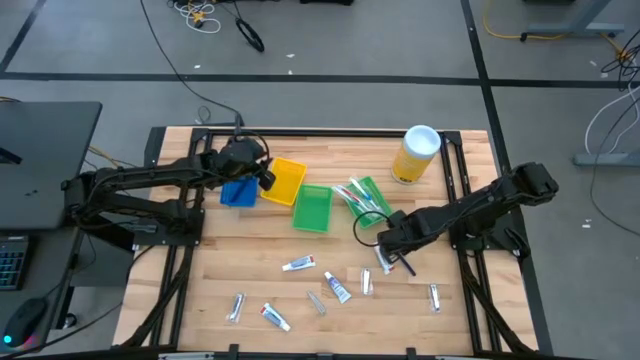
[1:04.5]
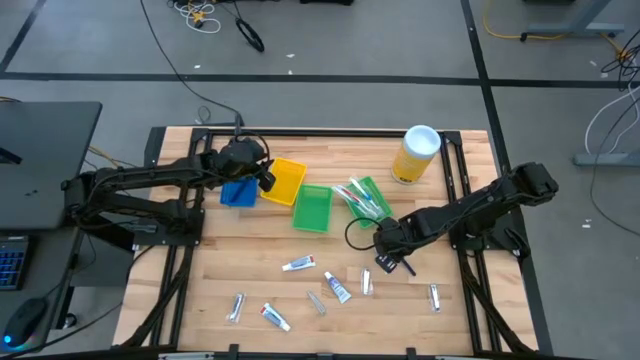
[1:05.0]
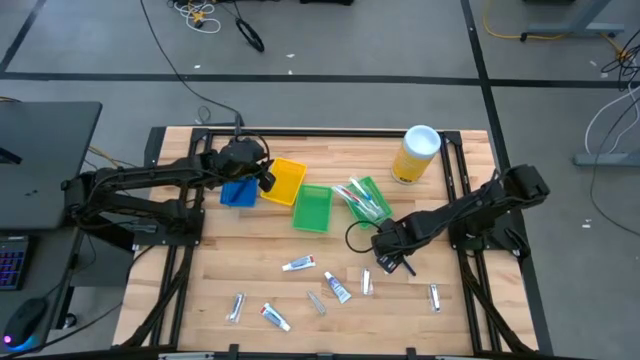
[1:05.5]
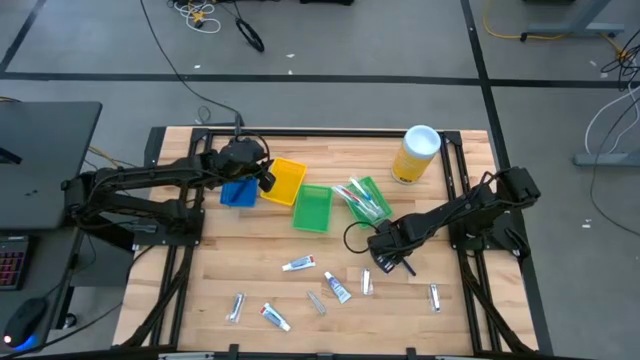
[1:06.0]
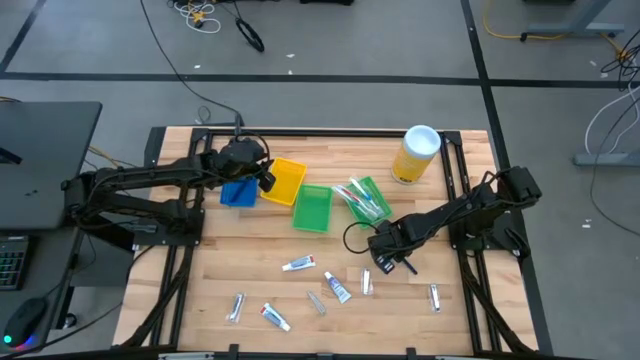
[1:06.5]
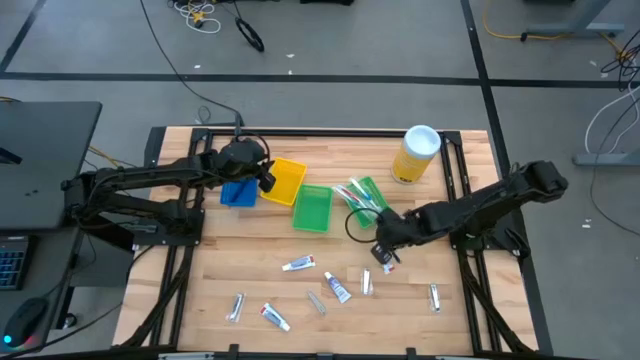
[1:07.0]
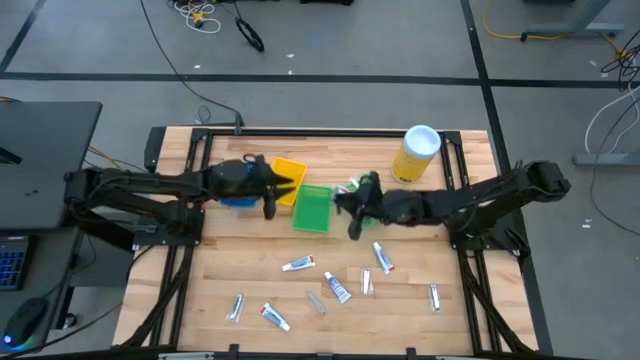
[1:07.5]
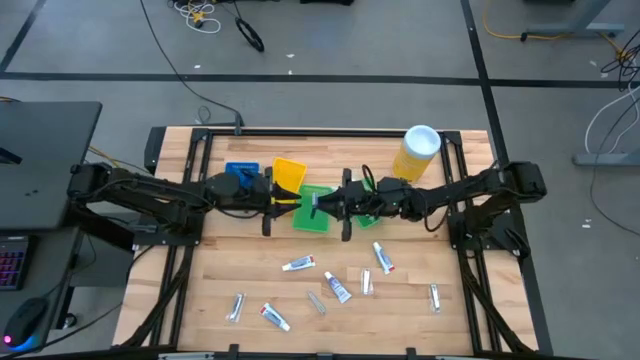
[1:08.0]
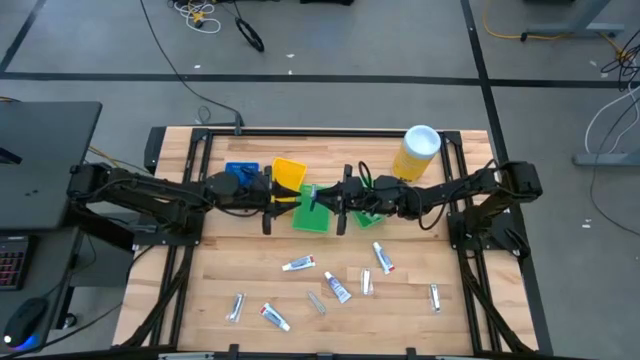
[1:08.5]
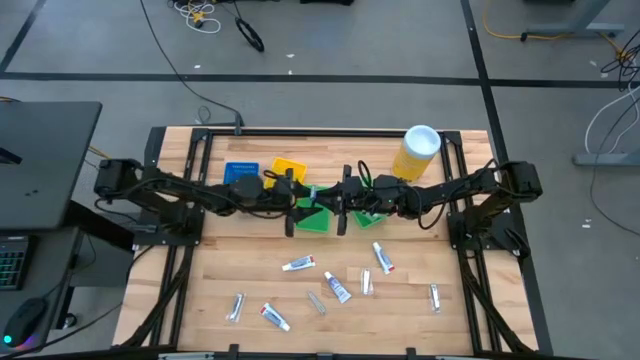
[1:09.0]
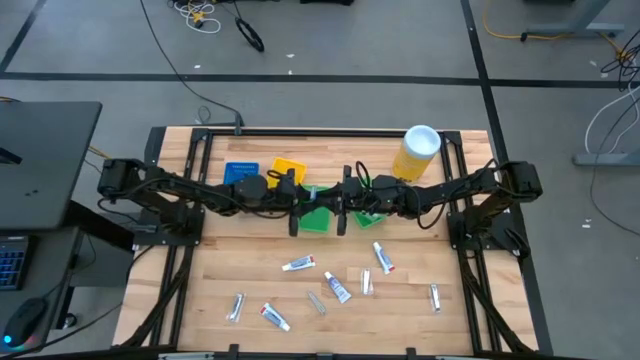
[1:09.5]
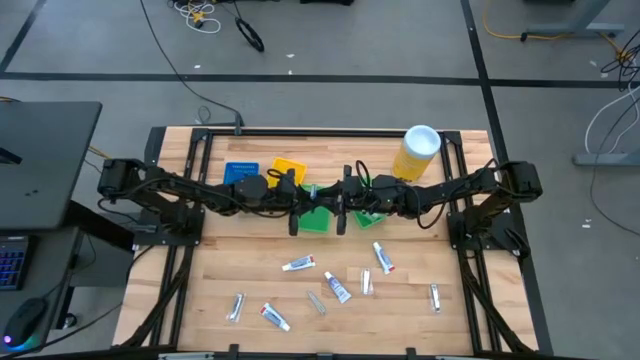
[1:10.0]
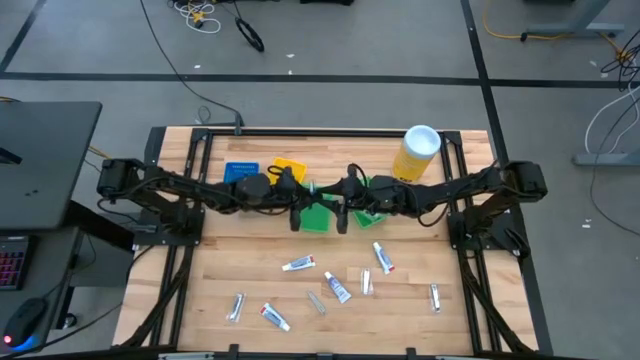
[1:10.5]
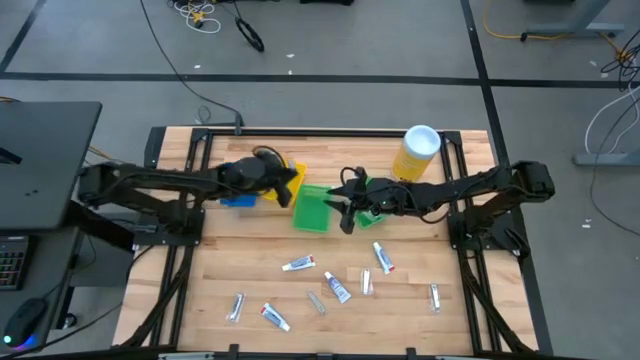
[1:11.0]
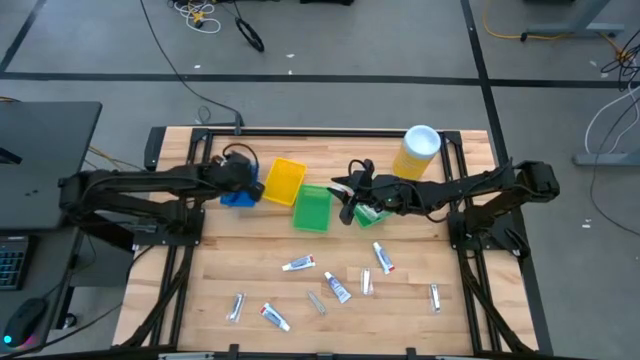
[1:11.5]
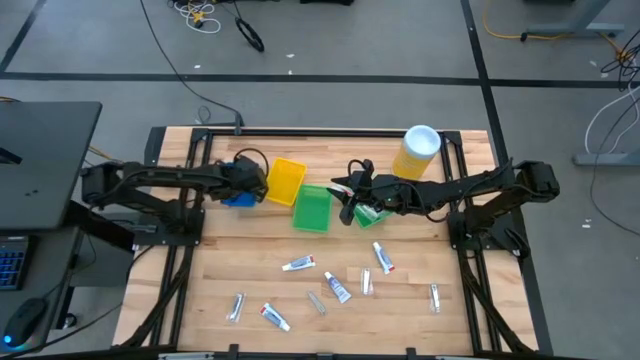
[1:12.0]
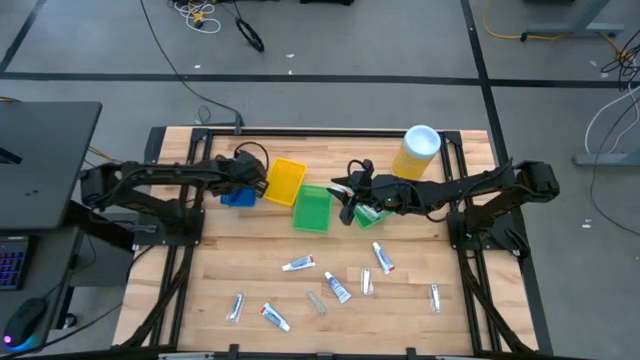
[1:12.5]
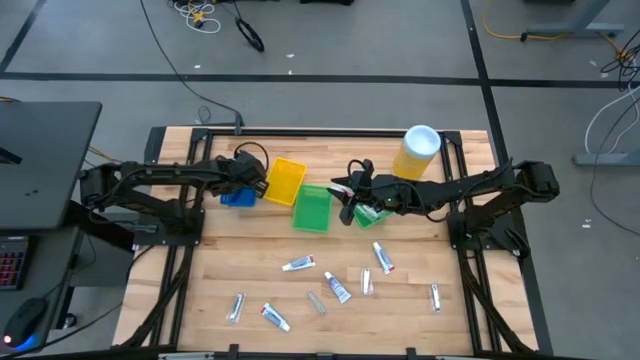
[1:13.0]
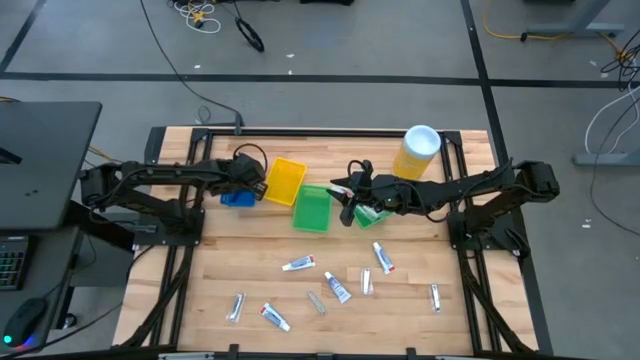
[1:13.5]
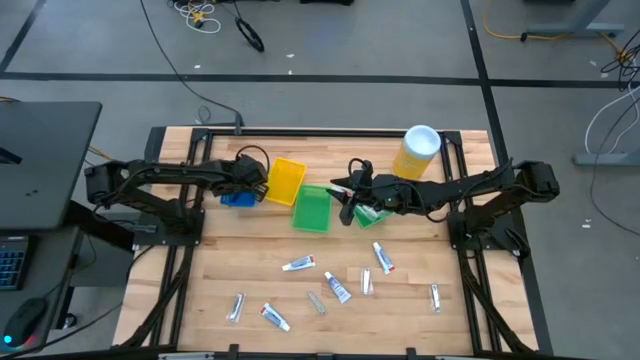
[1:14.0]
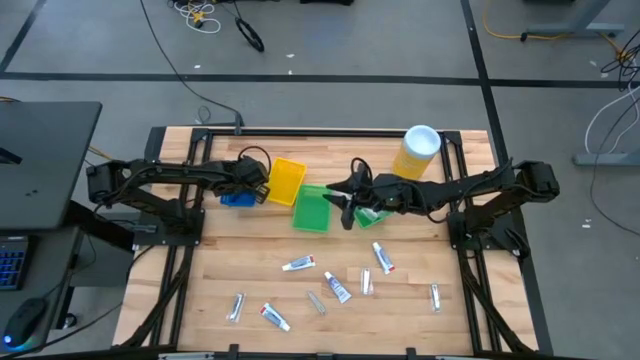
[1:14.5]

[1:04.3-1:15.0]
Task: Pick & Place Travel size toiletries
Put the blue razor into the blue bin

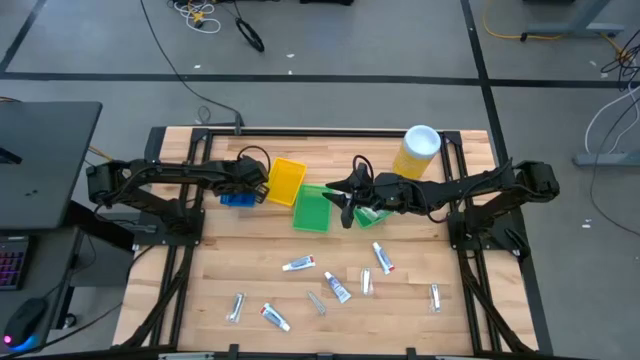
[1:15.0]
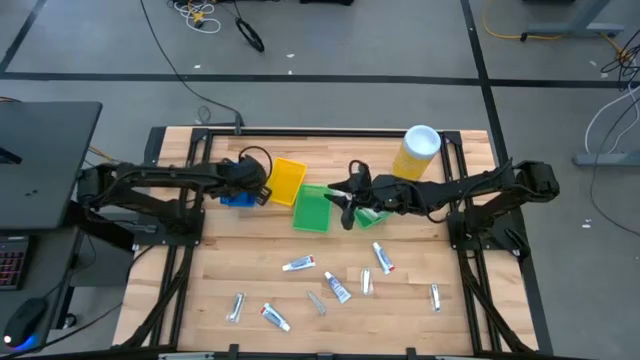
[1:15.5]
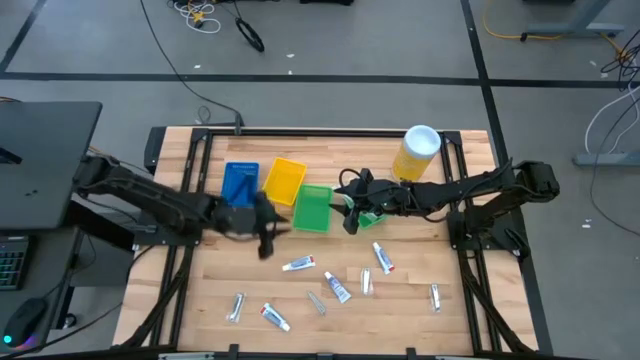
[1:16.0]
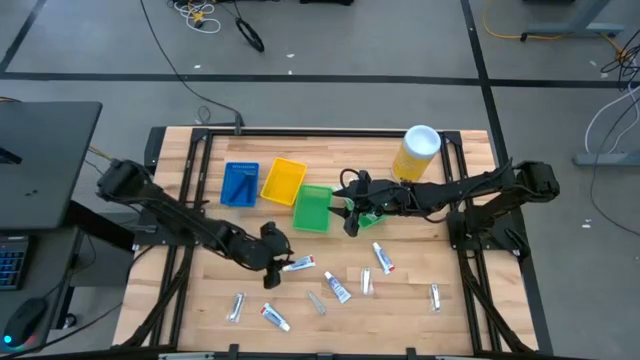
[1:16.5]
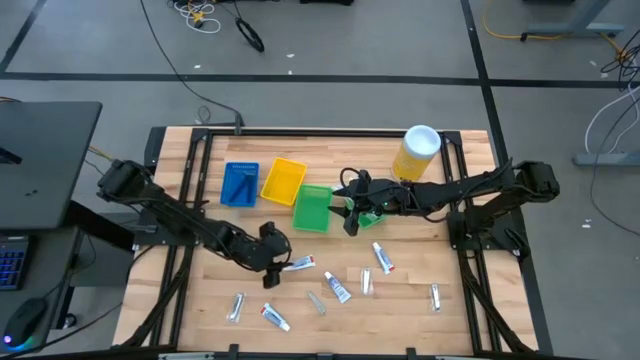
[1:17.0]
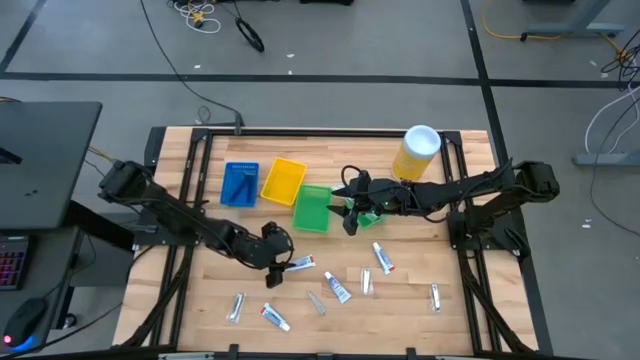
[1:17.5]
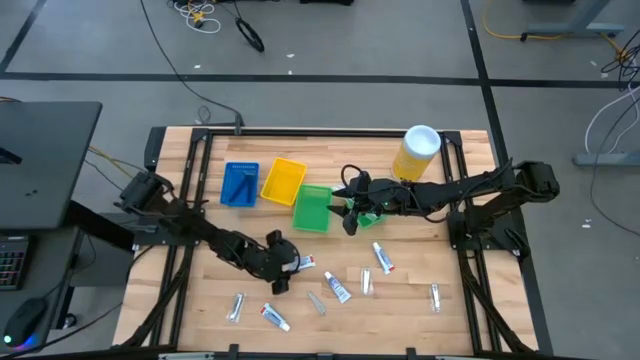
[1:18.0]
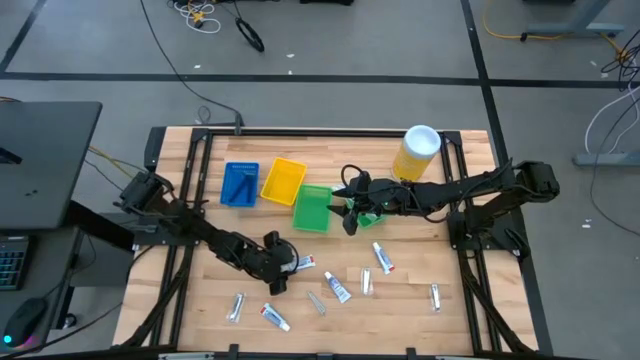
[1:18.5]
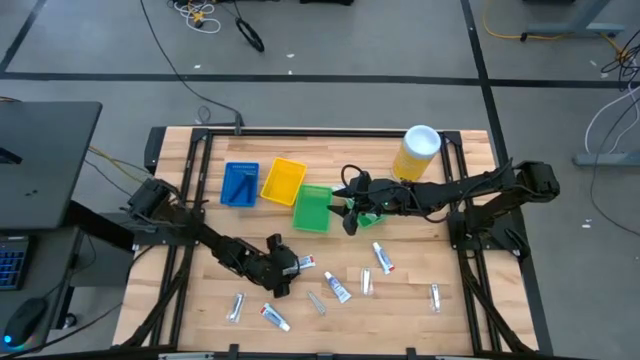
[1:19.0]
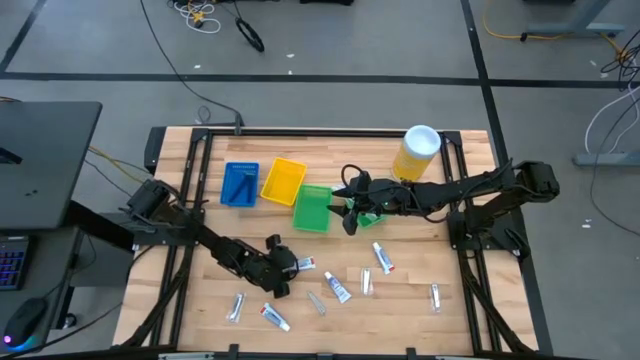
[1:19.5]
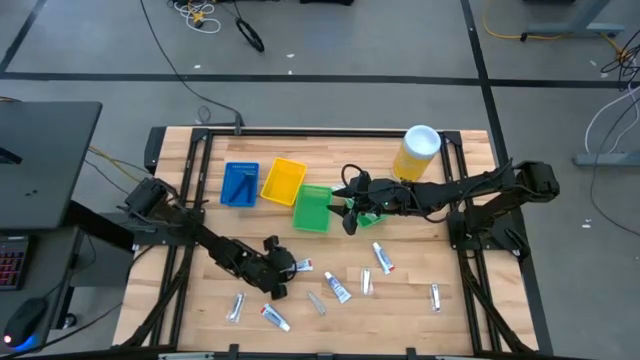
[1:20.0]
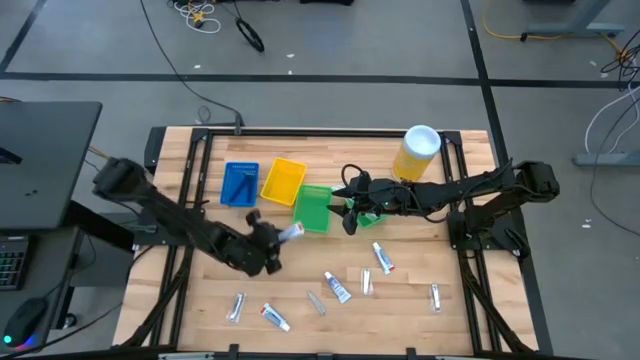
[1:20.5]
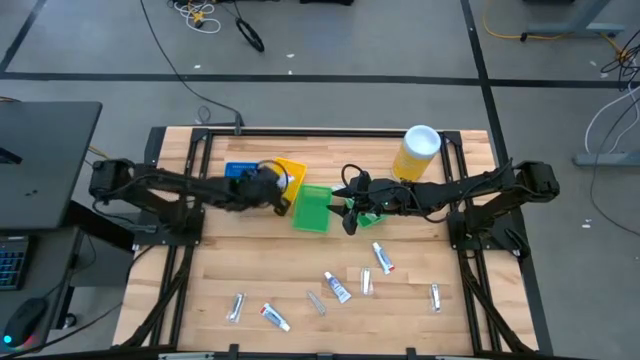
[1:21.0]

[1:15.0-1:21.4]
Put the white toothpaste into the yellow bin

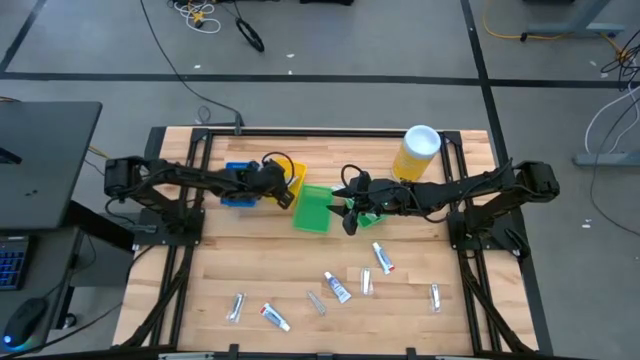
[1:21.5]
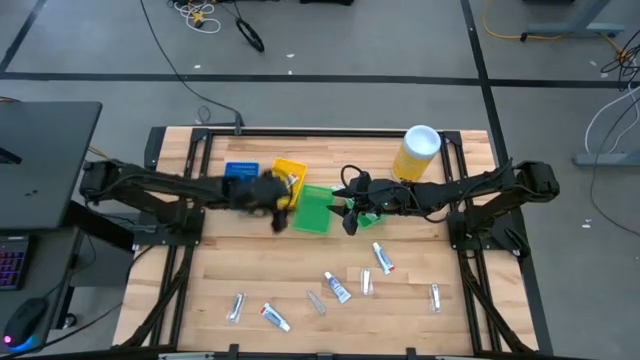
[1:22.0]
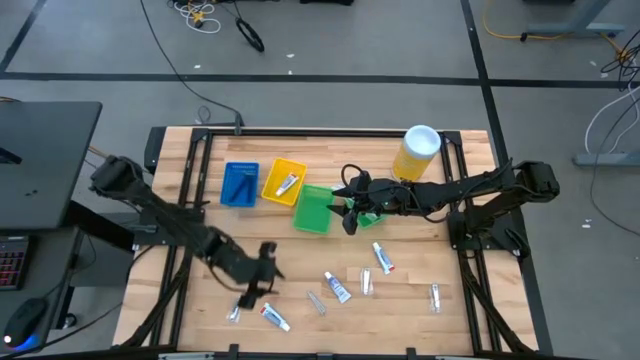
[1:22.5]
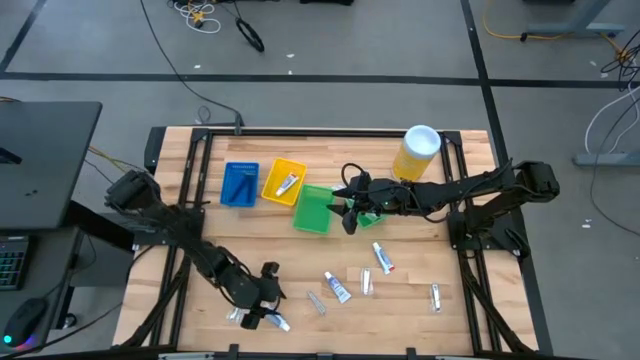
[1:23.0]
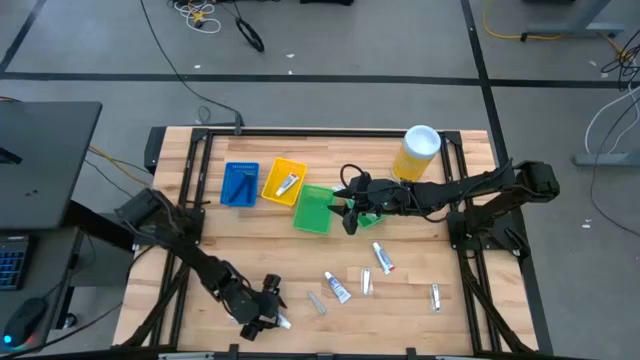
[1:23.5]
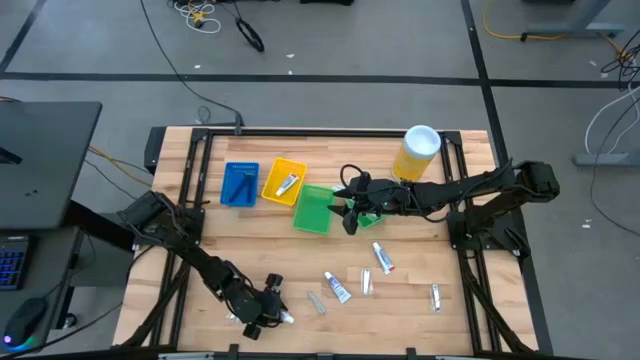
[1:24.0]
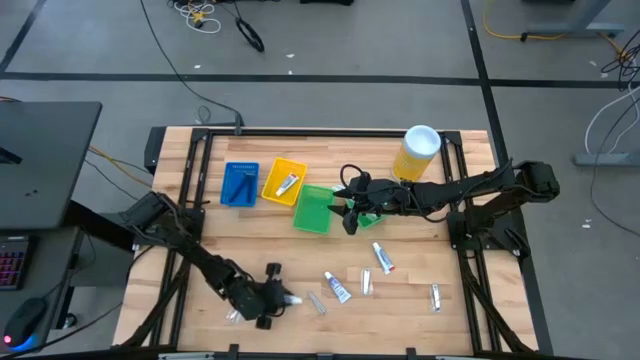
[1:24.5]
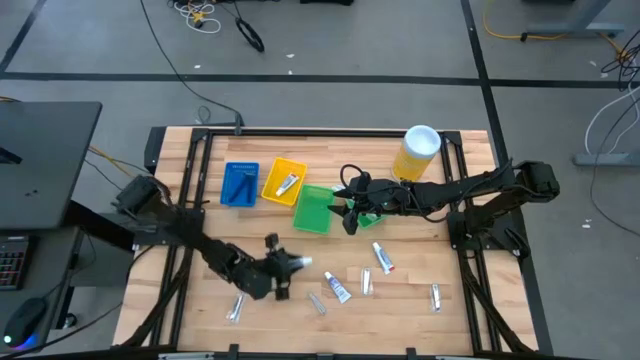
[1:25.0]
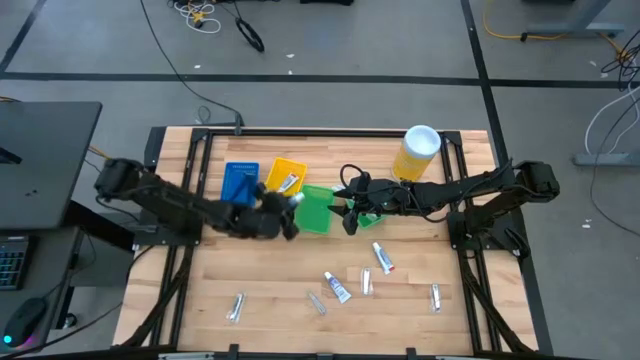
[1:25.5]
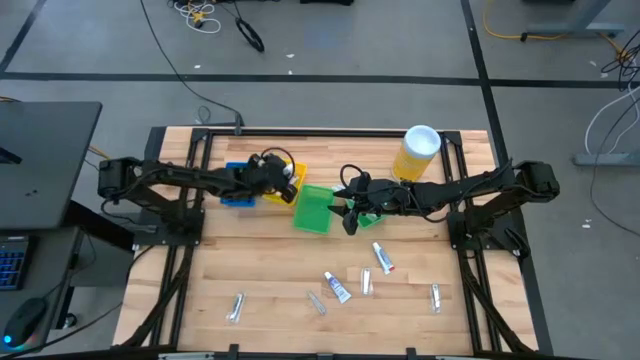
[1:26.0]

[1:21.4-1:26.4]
Put the white toothpaste into the yellow bin
